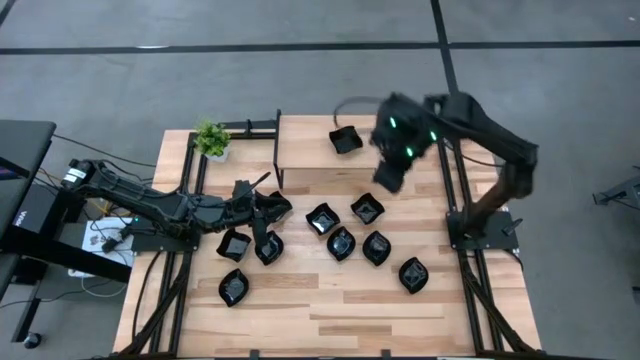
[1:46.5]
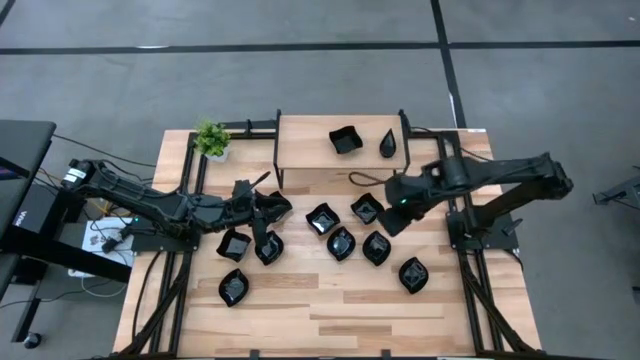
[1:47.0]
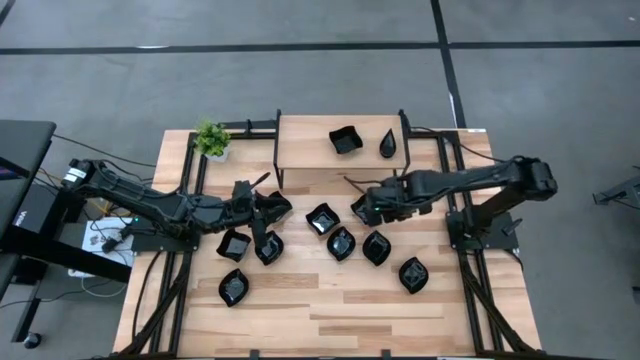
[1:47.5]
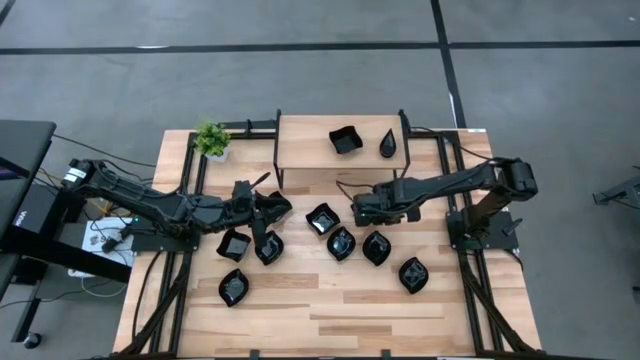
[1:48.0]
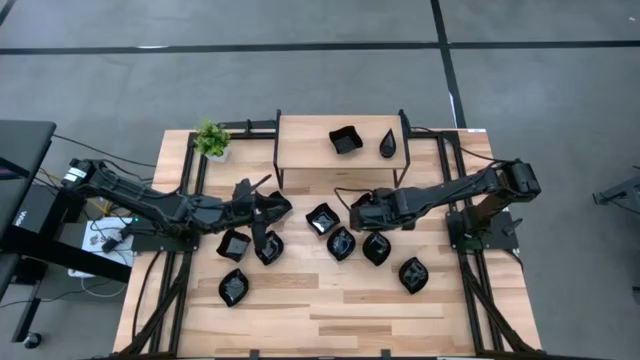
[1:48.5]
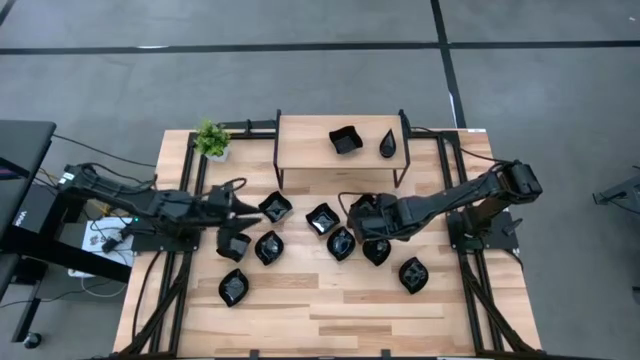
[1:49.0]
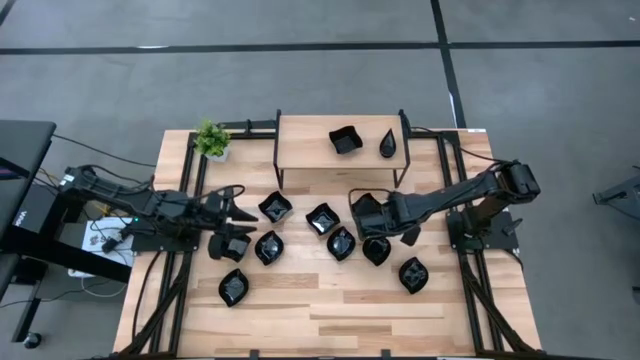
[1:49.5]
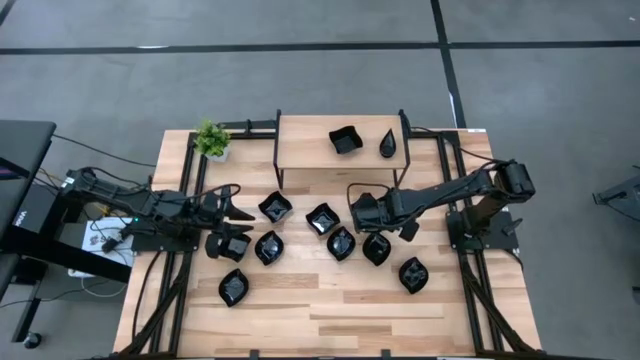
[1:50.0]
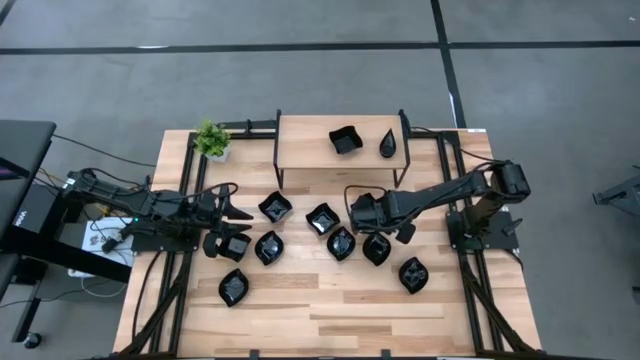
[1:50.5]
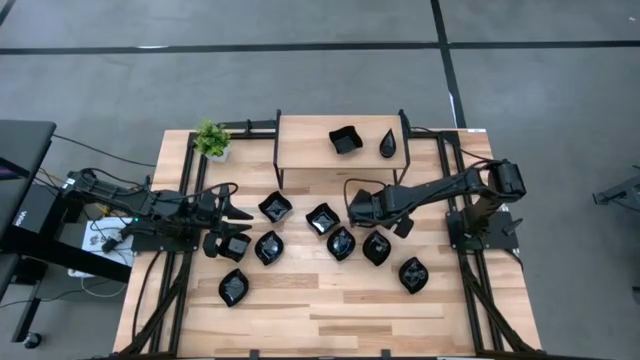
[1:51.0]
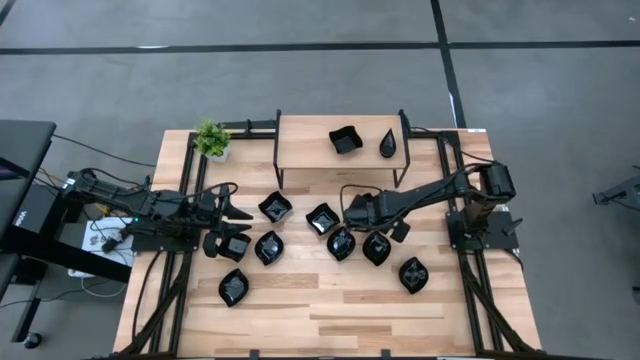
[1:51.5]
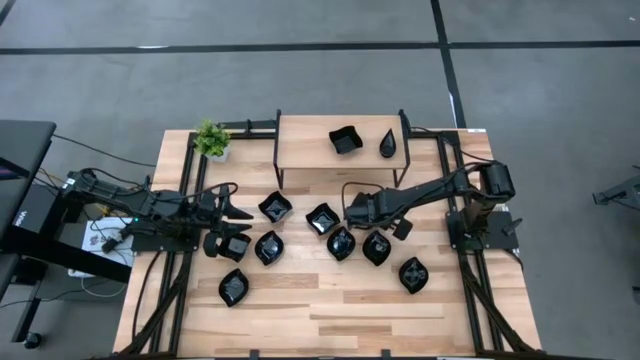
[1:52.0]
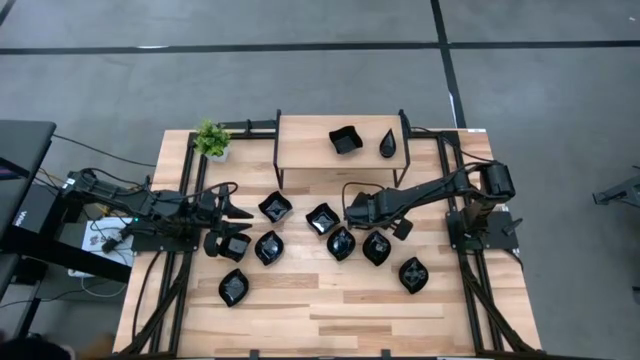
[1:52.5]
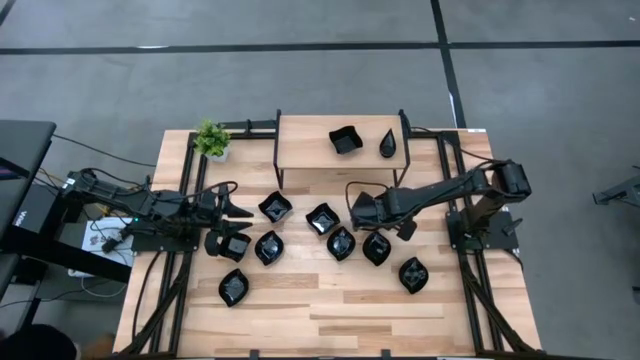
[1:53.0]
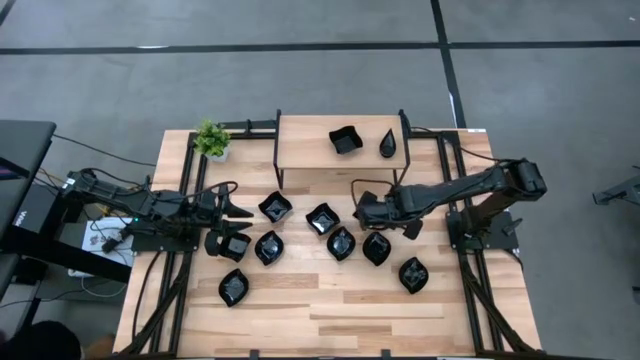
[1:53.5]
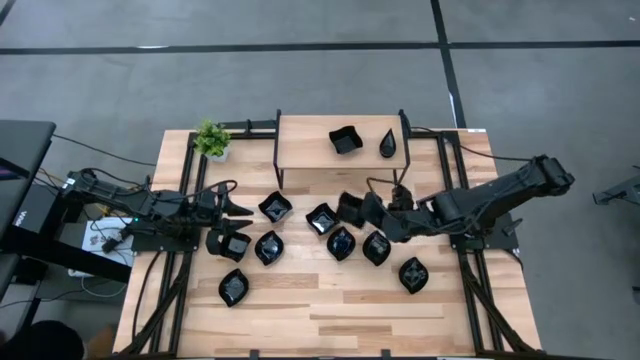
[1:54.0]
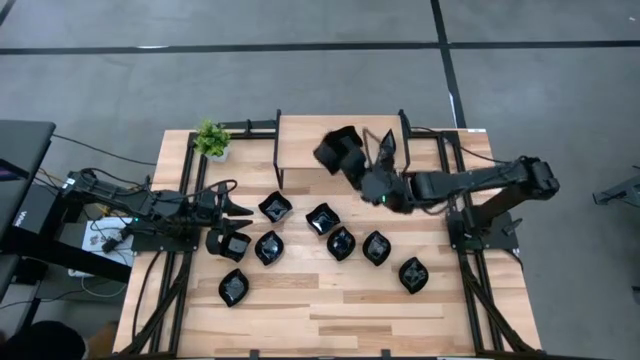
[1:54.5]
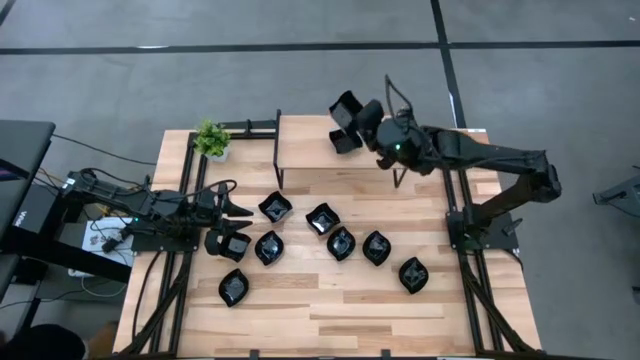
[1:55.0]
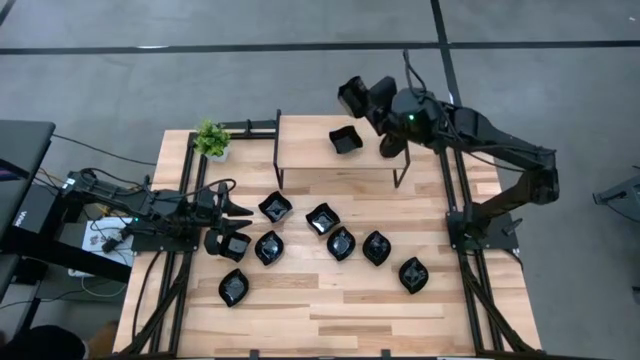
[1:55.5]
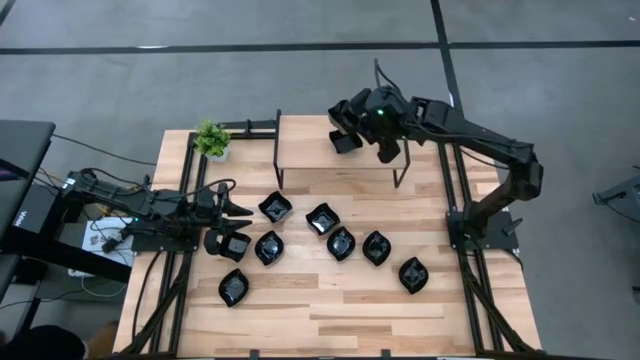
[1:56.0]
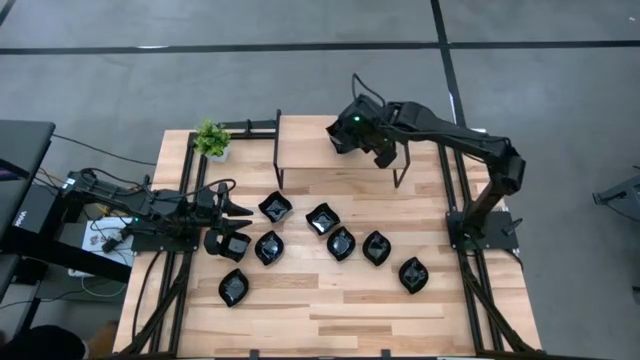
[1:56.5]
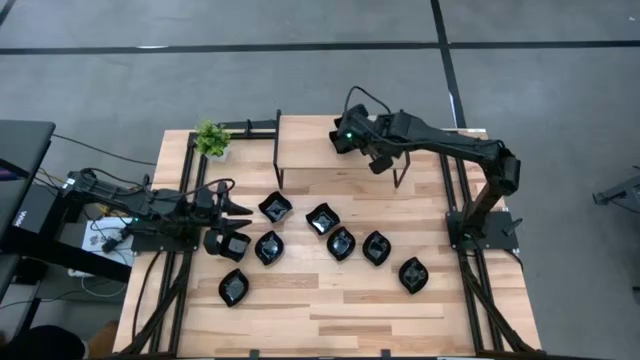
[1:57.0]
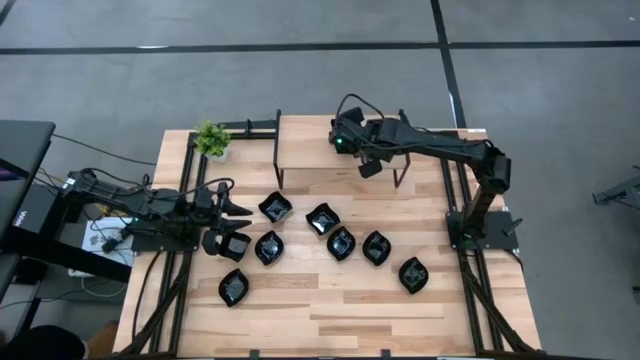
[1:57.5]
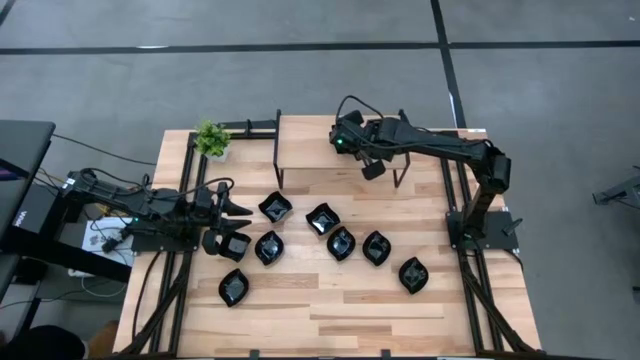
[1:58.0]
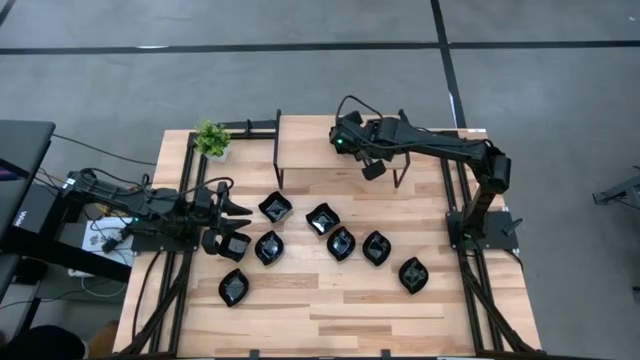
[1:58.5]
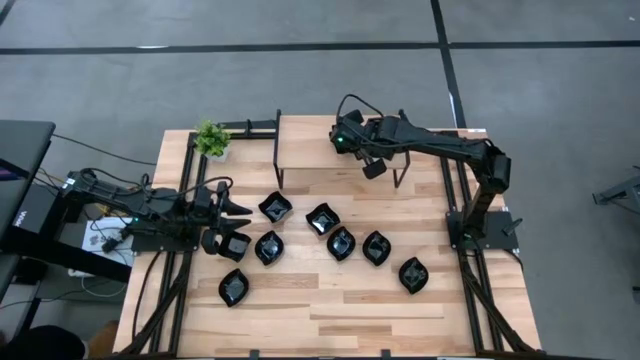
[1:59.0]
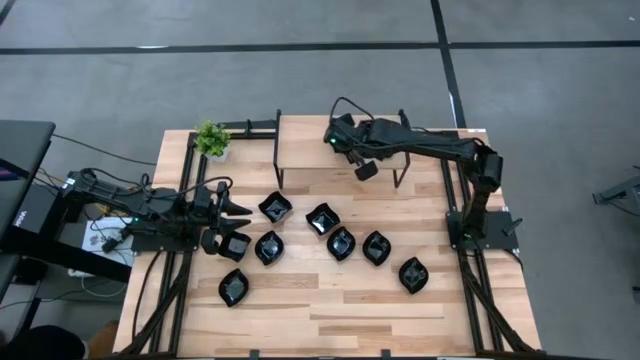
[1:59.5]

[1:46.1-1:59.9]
Task: Pick & Place Mini shaped plates
Stack the black plate on top of the black plate on the shelf

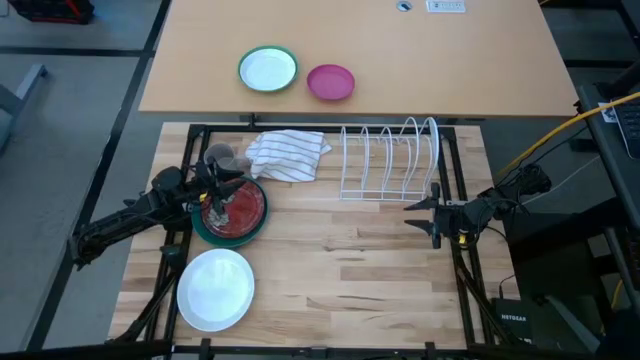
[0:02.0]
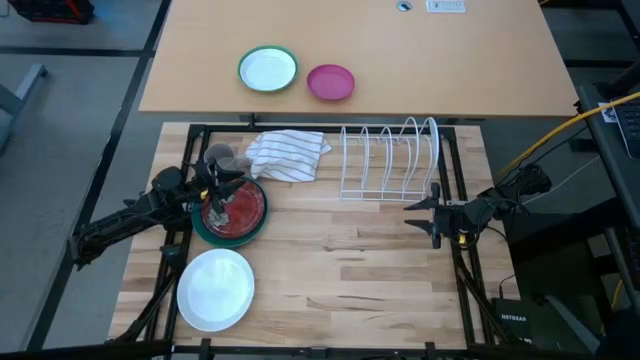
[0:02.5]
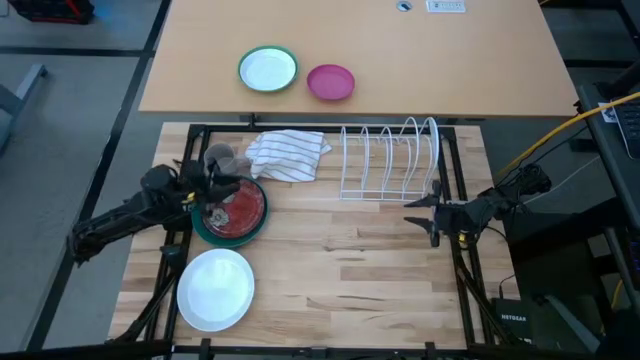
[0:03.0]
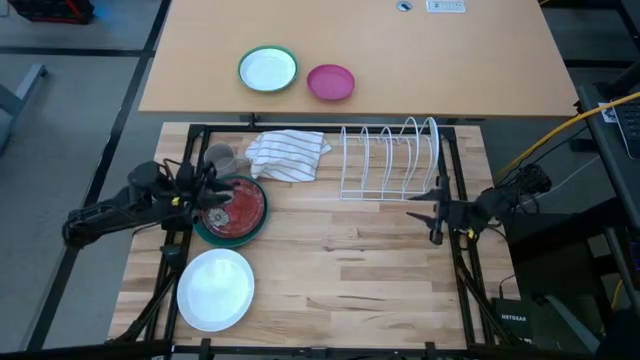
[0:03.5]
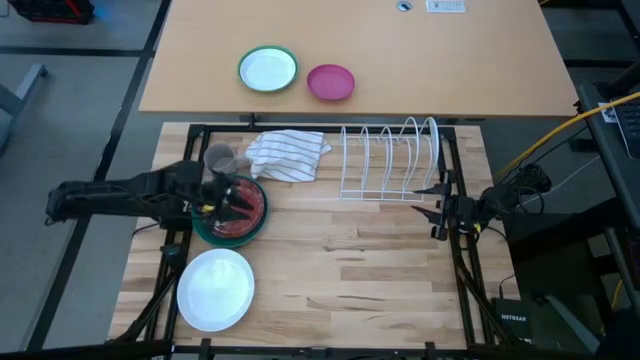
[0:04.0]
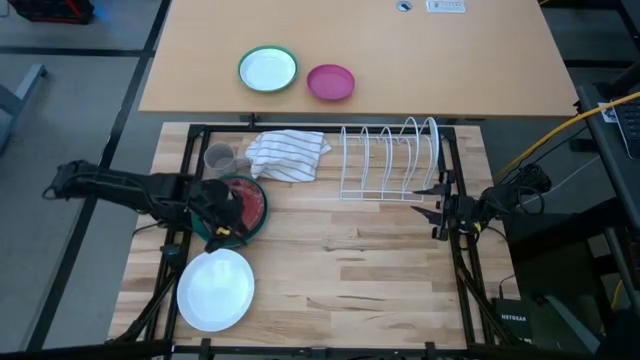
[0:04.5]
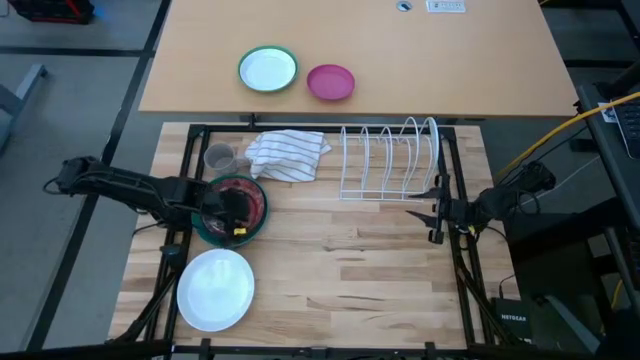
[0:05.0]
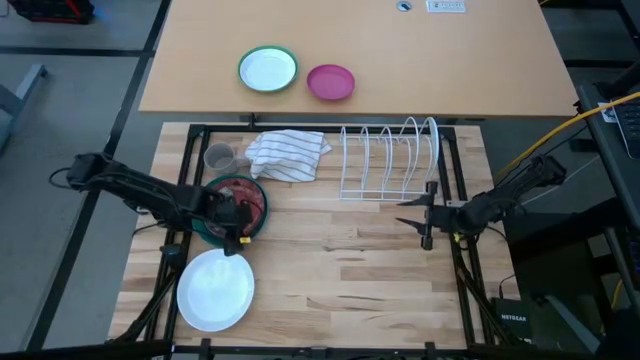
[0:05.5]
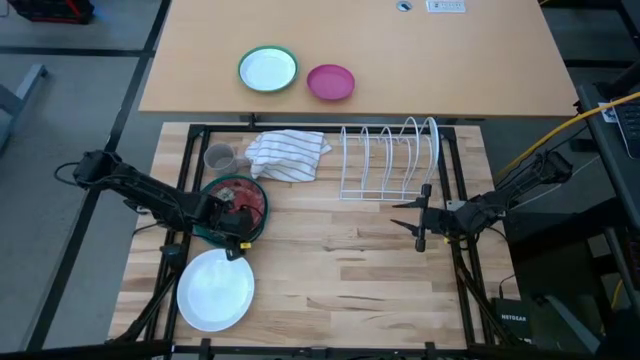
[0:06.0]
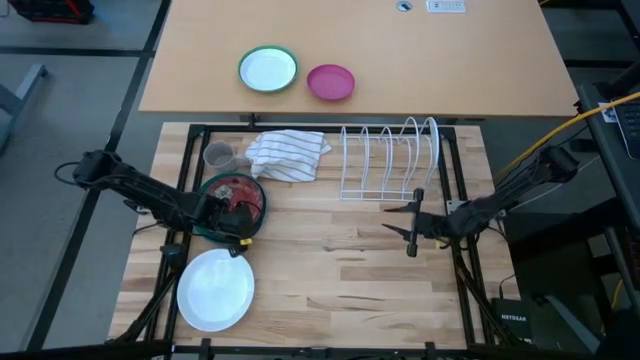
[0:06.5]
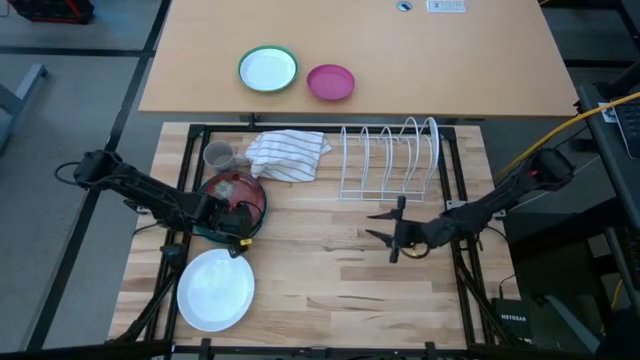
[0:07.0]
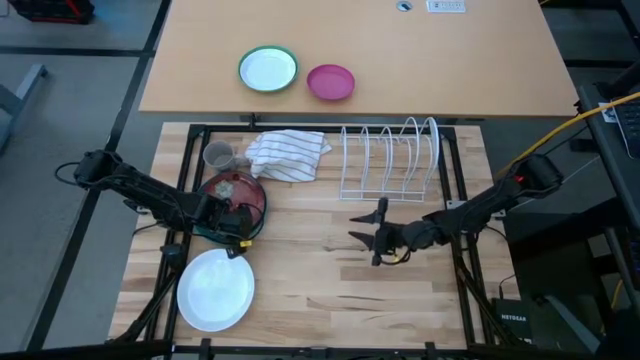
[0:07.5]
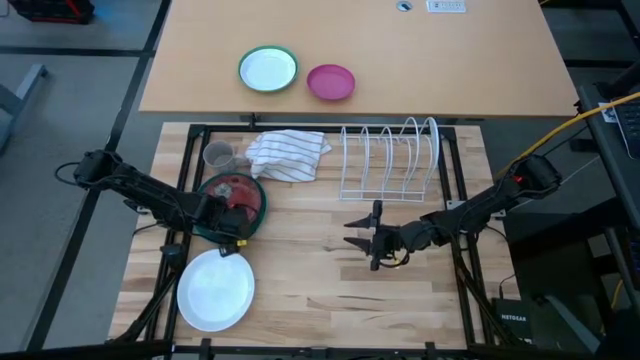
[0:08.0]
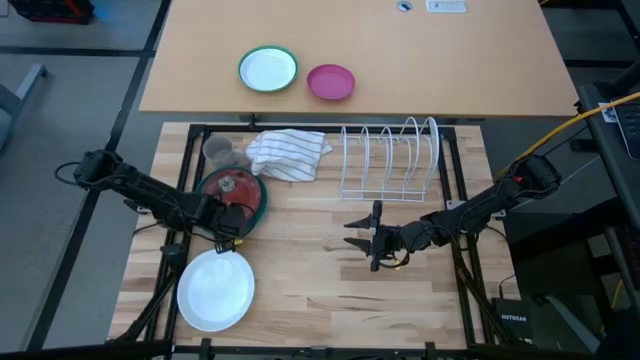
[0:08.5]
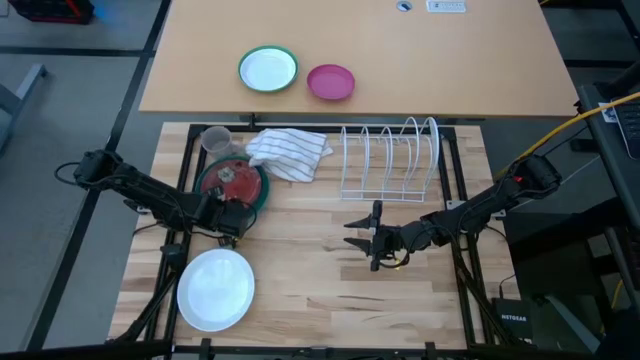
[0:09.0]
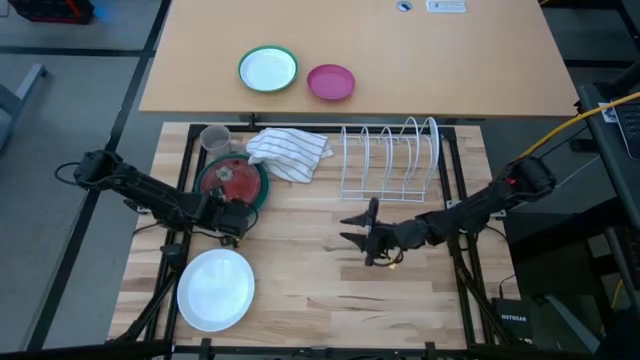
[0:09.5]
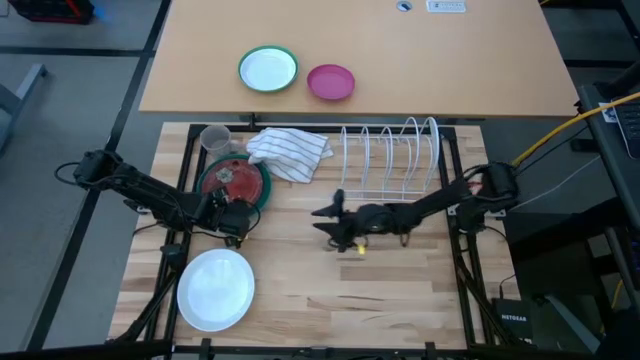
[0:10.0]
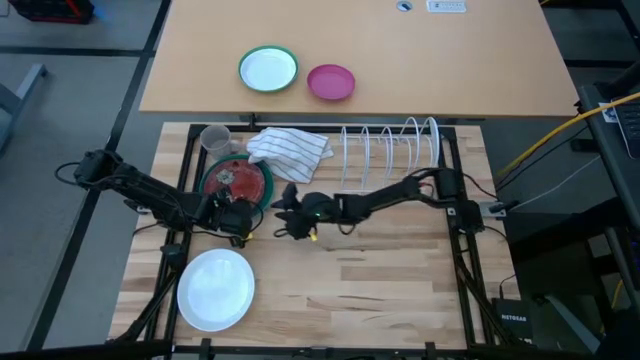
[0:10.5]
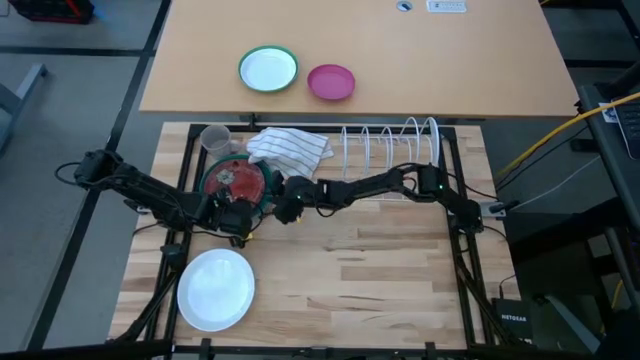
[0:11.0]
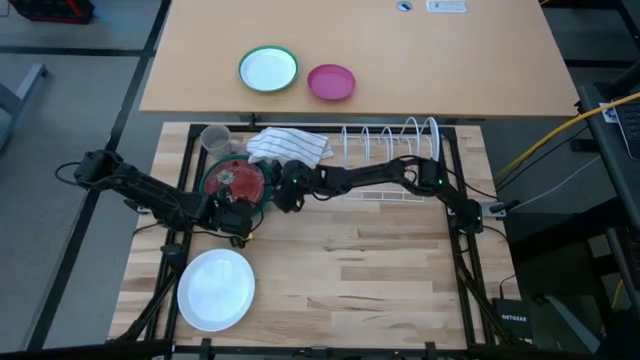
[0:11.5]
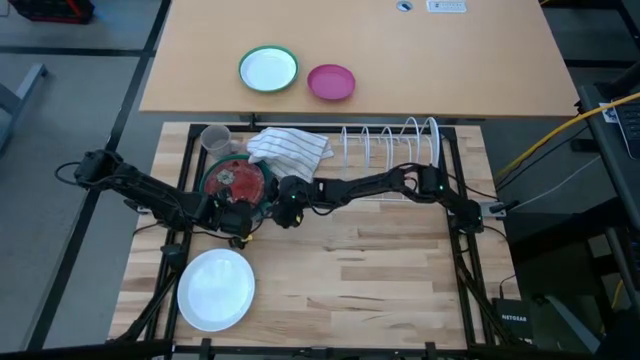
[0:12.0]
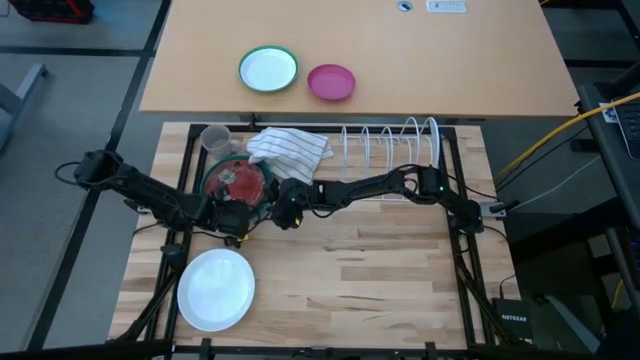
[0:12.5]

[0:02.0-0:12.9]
Task: Sort dishes
Put the red plate in the dish rack
